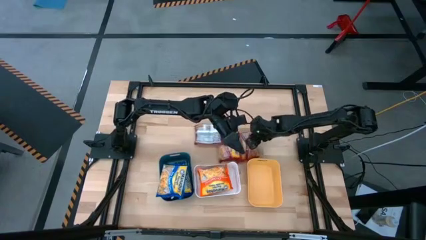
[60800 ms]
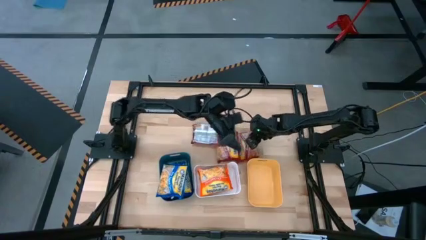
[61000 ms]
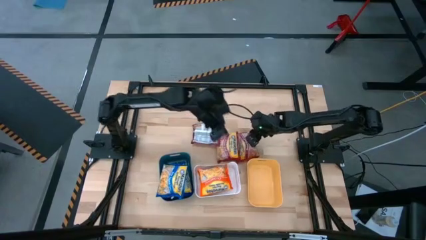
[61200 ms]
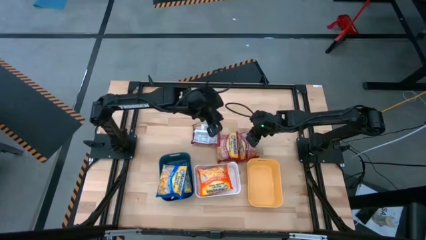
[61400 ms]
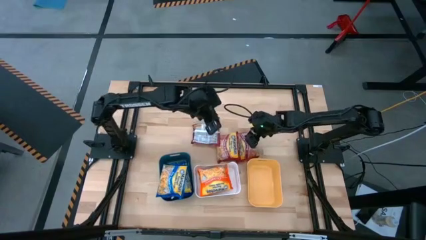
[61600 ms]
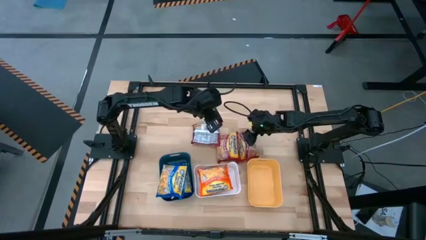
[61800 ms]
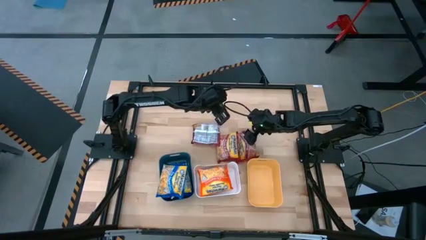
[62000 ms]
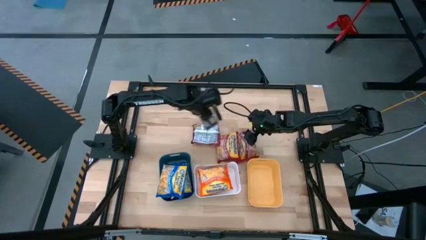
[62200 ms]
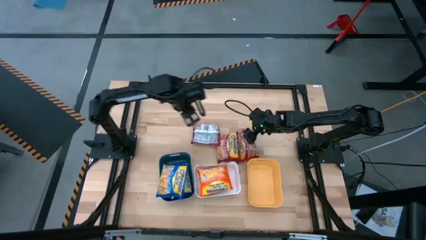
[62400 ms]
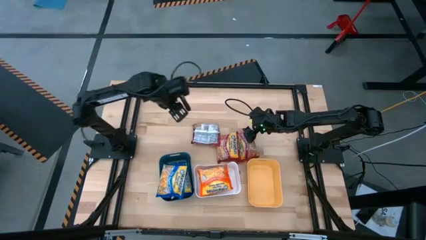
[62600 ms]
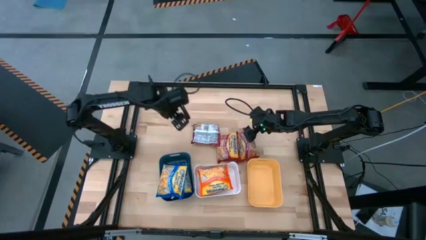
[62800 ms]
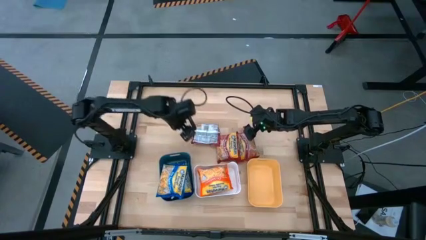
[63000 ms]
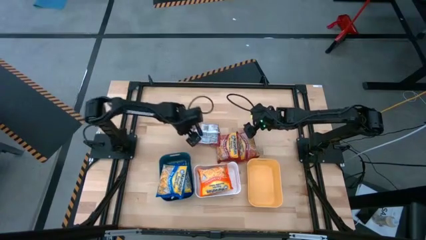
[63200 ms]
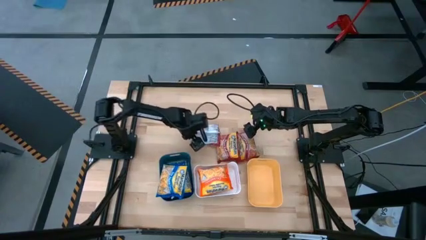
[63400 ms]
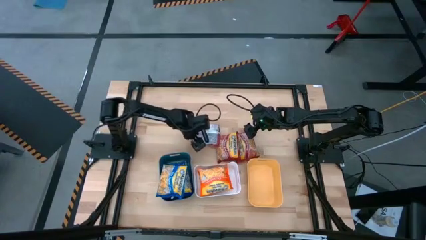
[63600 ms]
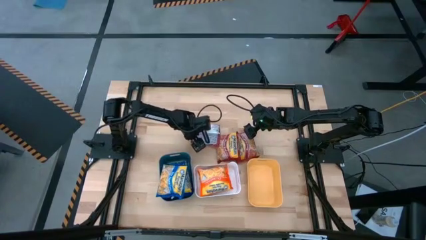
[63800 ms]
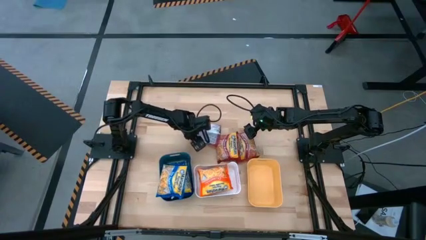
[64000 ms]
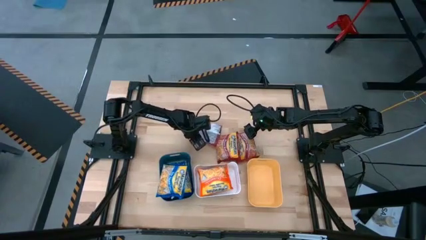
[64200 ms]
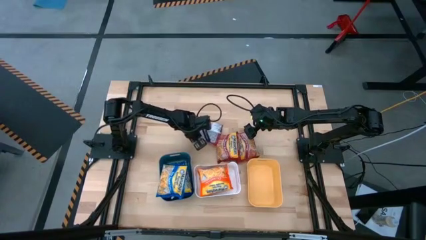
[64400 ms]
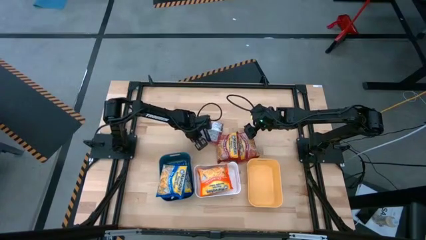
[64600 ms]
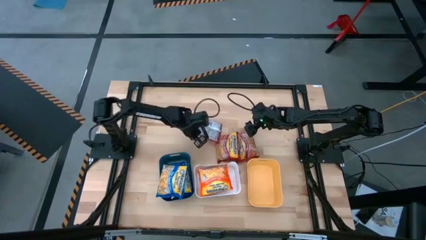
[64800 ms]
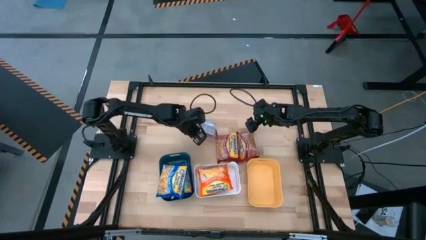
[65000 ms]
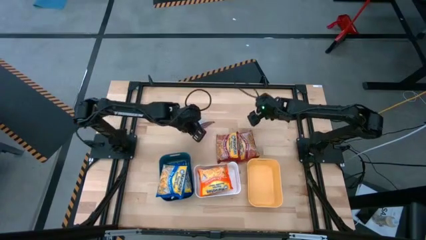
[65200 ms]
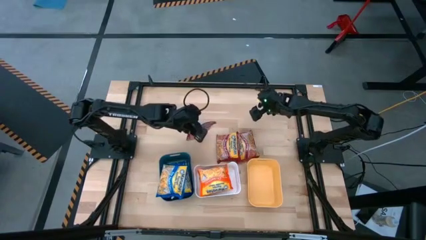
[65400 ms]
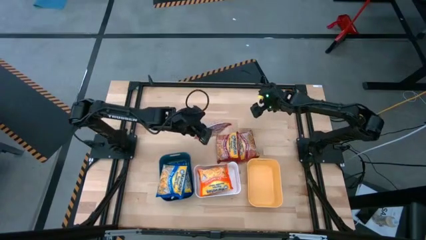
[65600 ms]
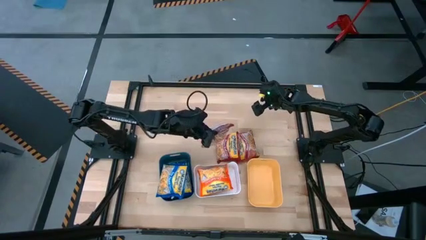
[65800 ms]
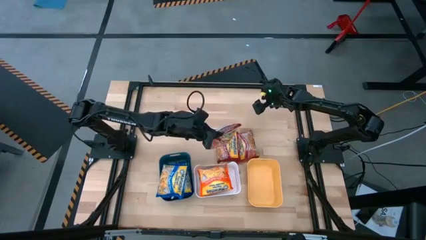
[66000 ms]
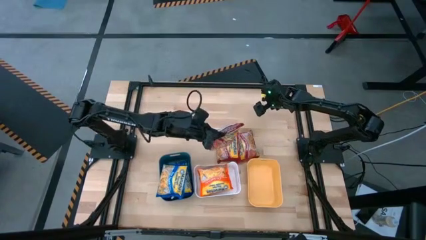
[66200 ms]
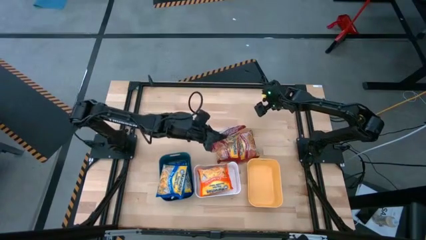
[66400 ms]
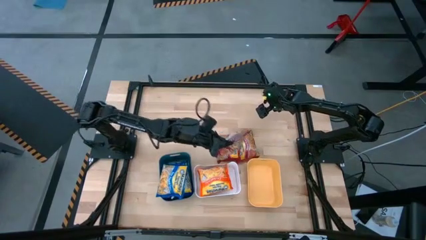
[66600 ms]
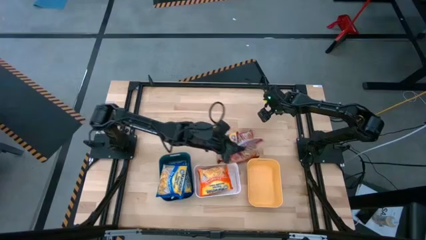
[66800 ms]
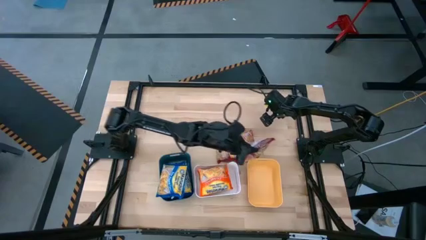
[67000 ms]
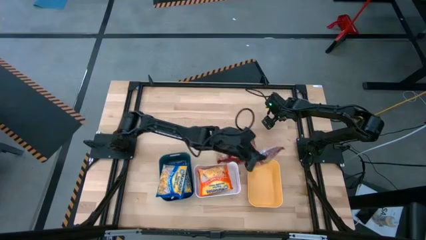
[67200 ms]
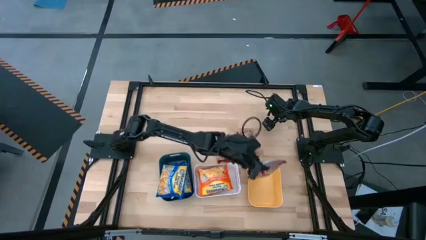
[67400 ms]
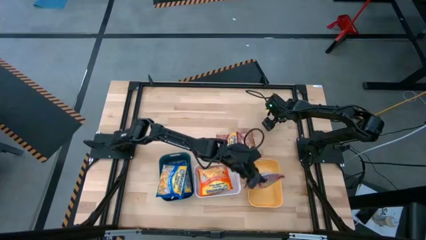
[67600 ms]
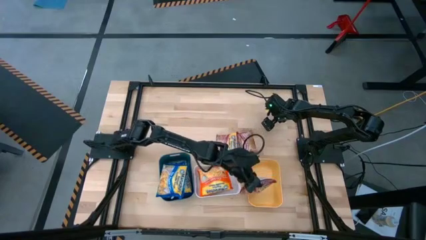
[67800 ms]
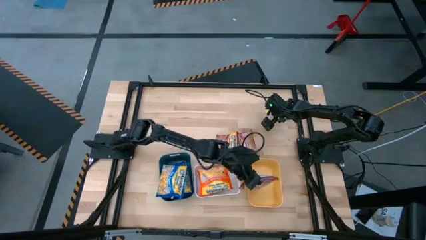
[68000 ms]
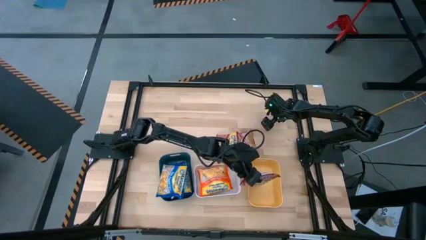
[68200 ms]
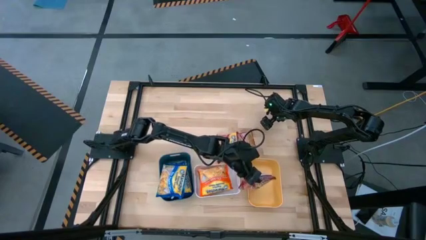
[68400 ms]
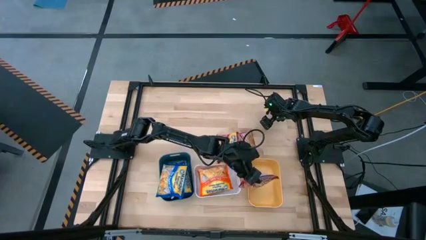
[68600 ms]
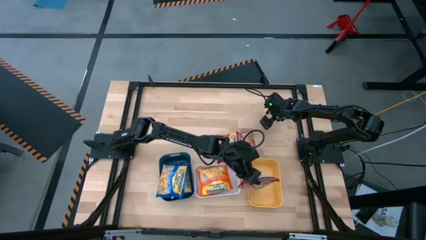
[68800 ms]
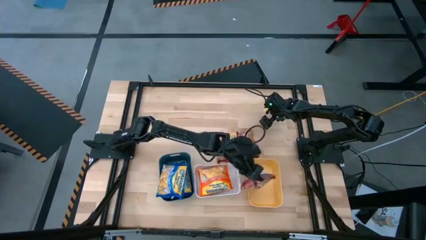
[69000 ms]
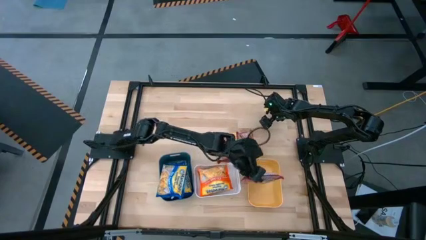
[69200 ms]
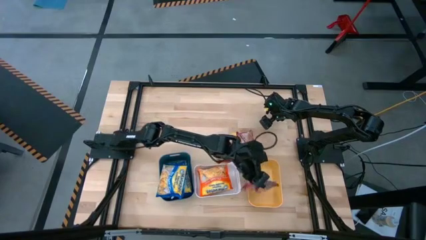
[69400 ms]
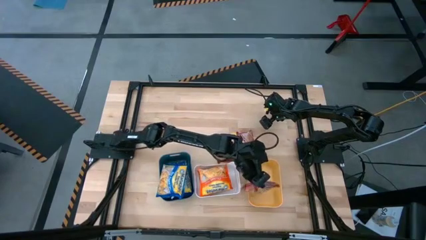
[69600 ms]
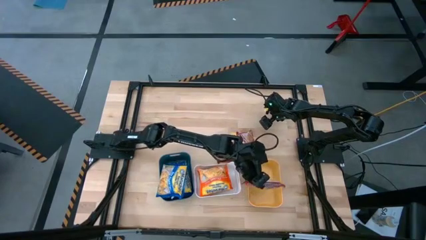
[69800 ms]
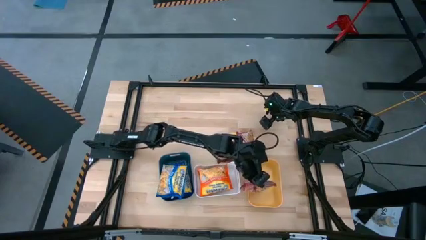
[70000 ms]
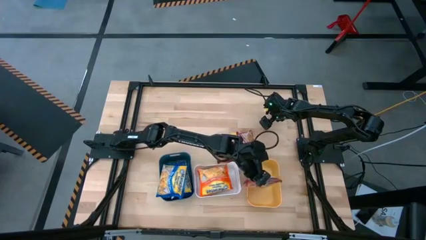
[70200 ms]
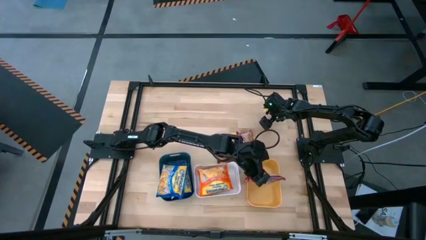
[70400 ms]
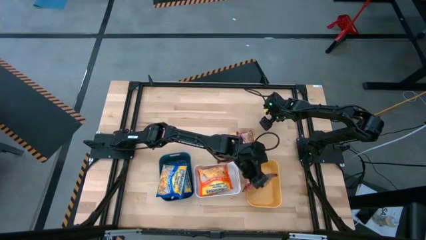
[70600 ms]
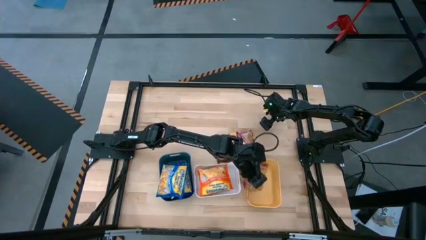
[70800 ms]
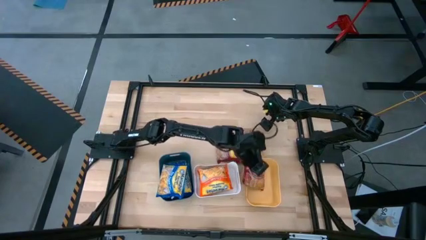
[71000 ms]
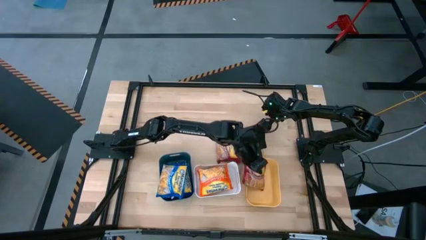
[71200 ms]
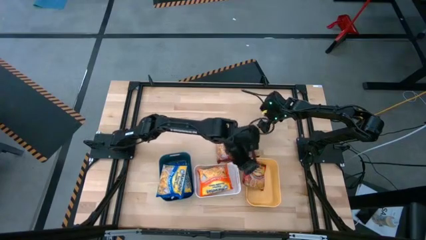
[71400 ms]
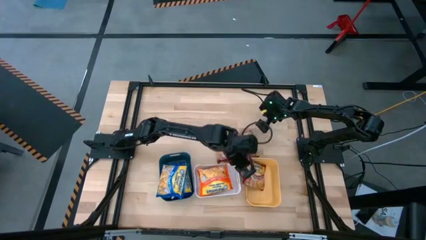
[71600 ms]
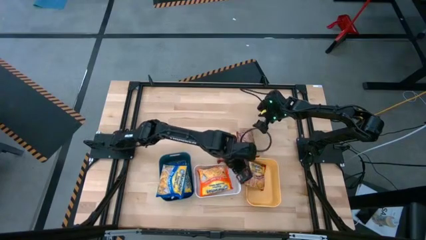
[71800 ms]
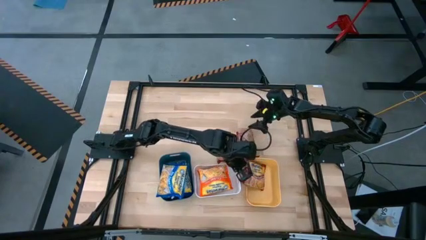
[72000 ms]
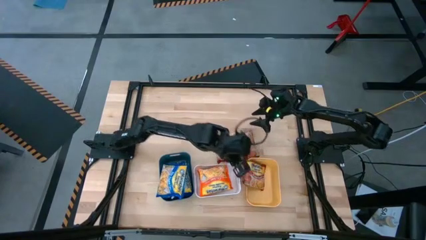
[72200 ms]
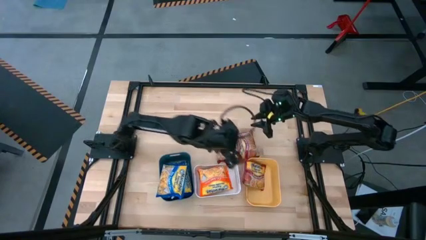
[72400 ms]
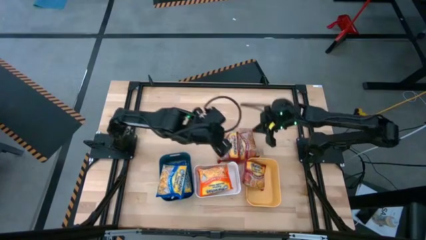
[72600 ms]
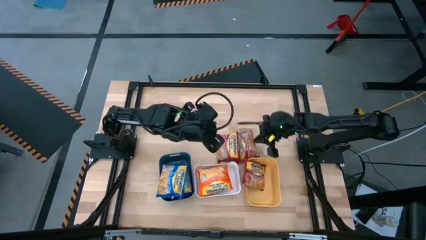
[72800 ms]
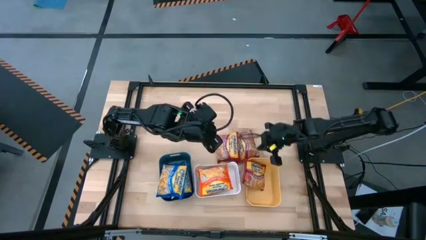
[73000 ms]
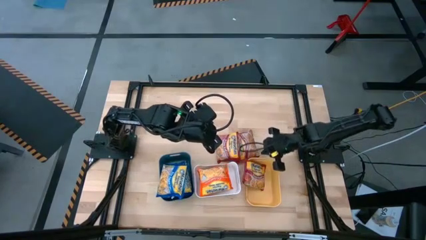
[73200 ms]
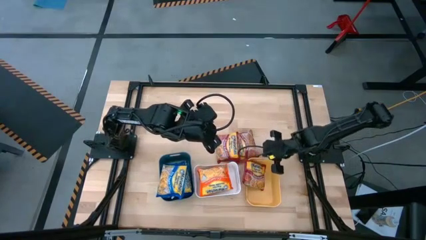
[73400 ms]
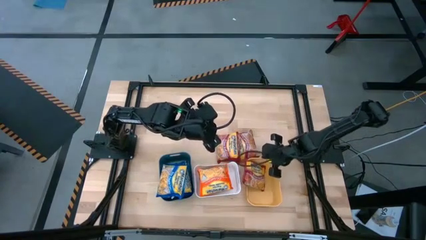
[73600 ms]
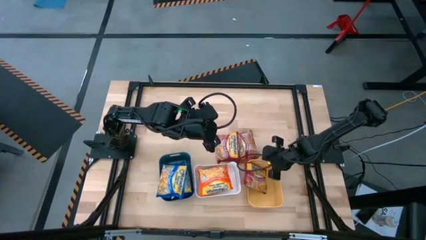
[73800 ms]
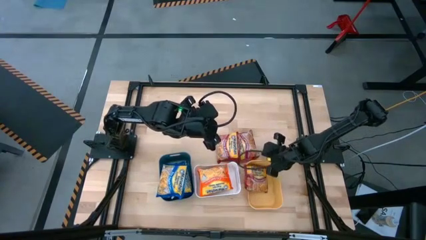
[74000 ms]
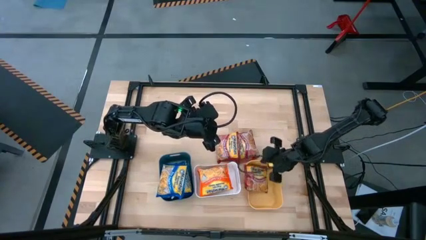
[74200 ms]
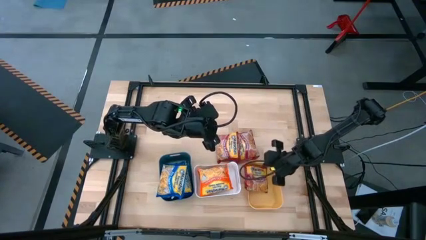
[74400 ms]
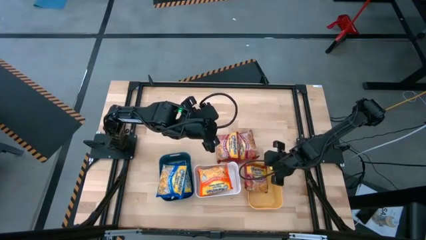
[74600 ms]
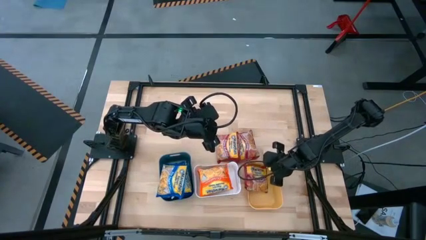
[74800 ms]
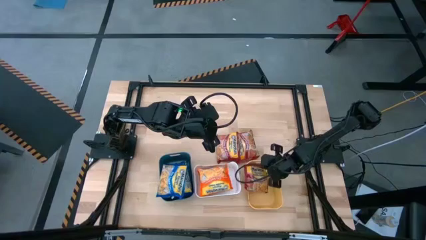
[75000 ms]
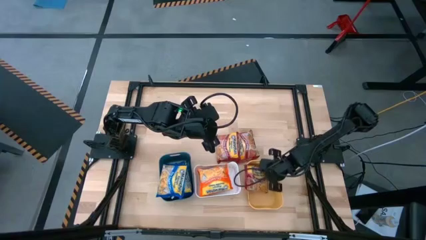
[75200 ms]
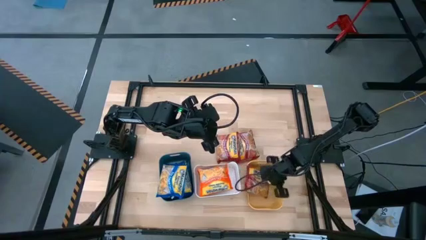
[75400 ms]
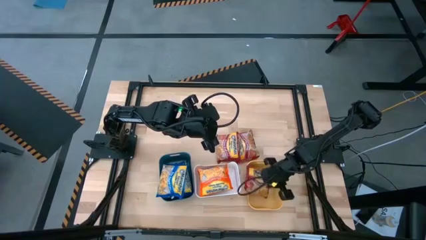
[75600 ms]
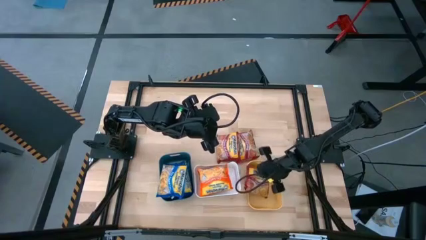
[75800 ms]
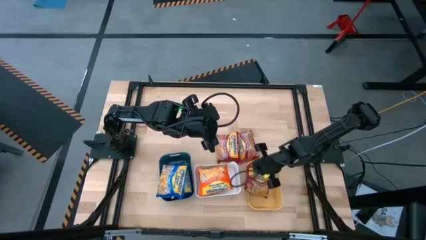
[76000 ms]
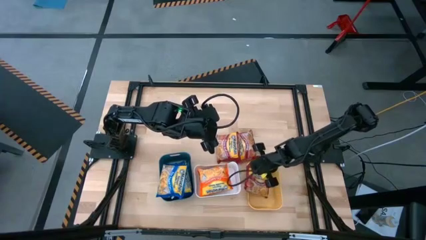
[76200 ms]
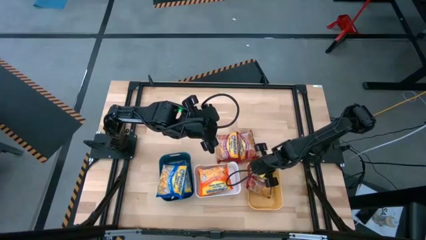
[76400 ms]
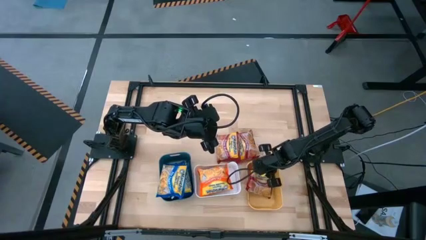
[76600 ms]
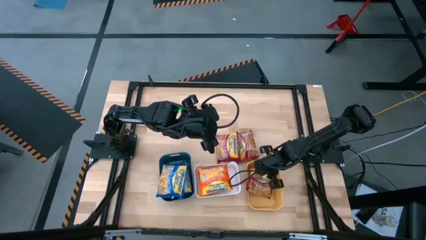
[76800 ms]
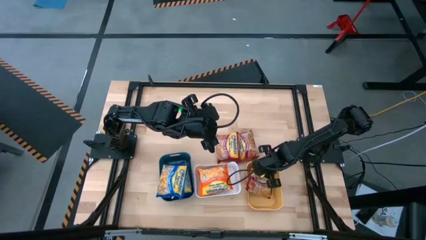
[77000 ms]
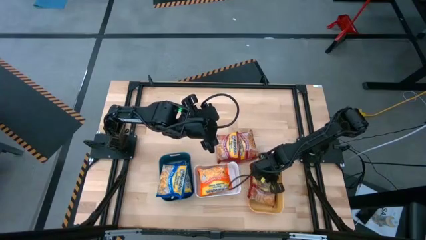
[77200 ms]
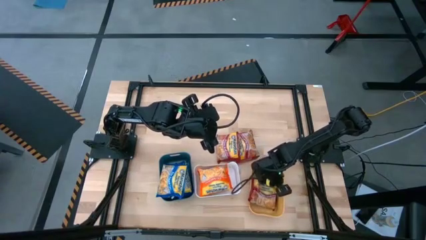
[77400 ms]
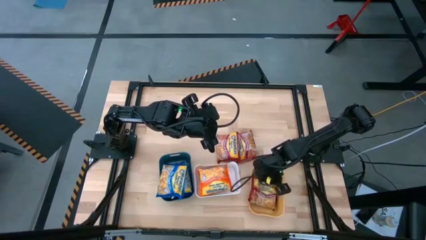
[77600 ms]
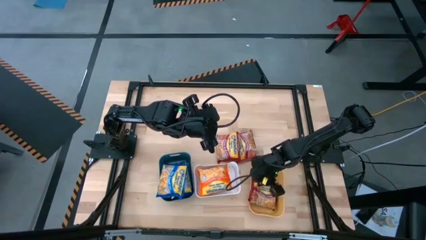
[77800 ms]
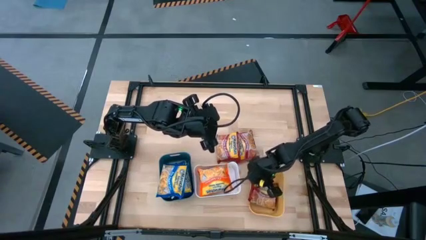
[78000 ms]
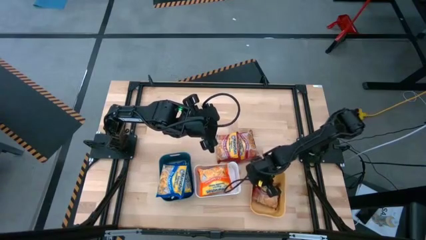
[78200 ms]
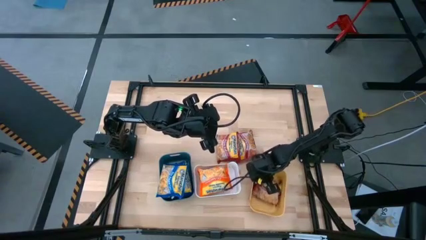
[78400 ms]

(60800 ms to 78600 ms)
Task: Sort Maruchan noodles
Put the left red noodle pack into the yellow bin
